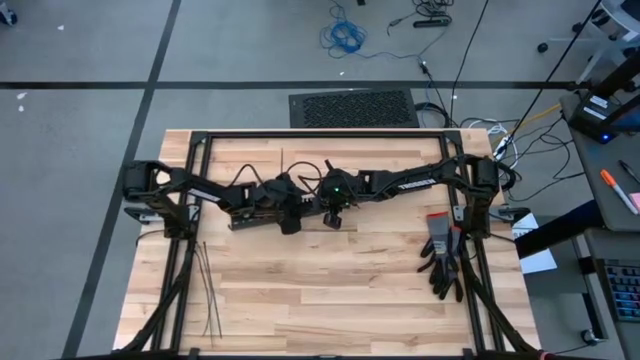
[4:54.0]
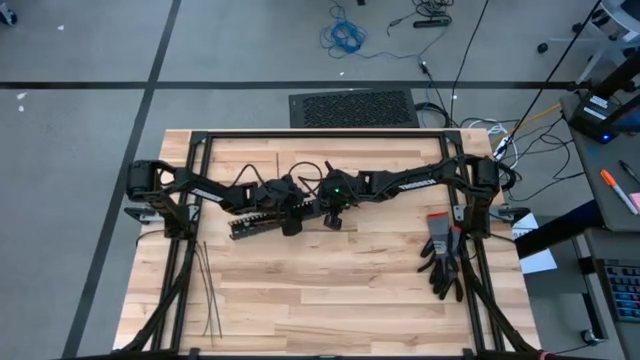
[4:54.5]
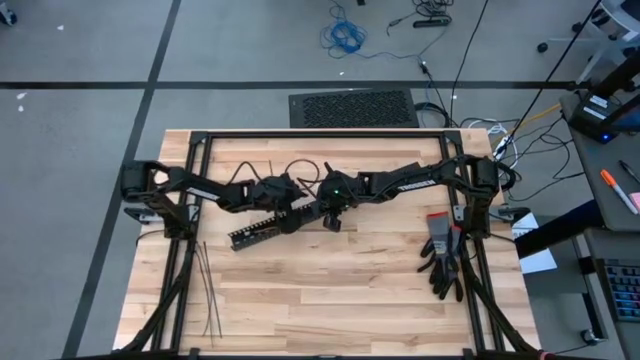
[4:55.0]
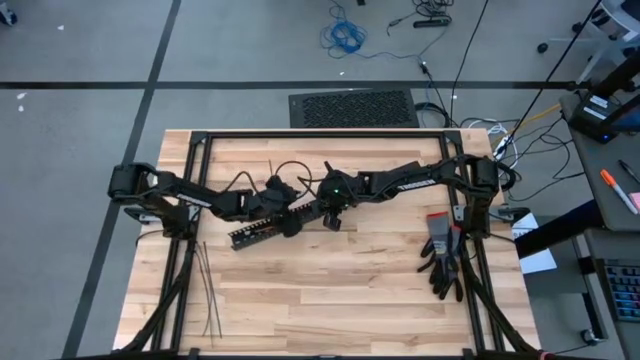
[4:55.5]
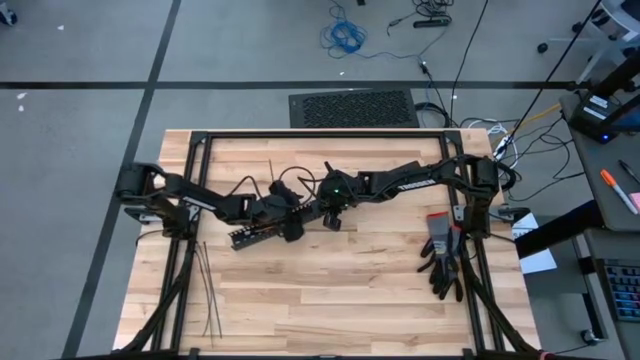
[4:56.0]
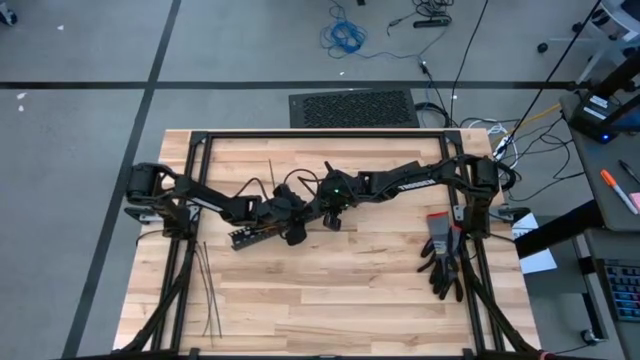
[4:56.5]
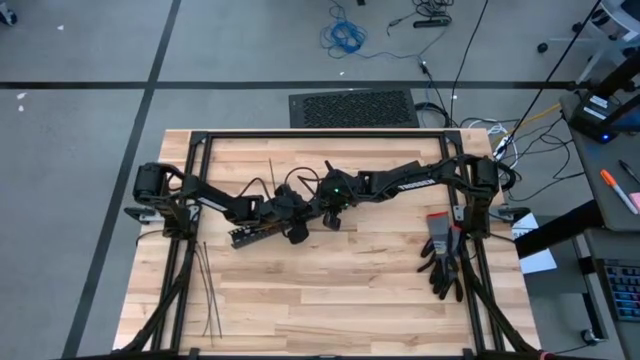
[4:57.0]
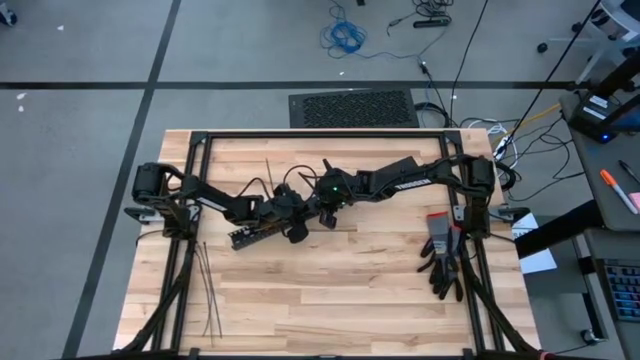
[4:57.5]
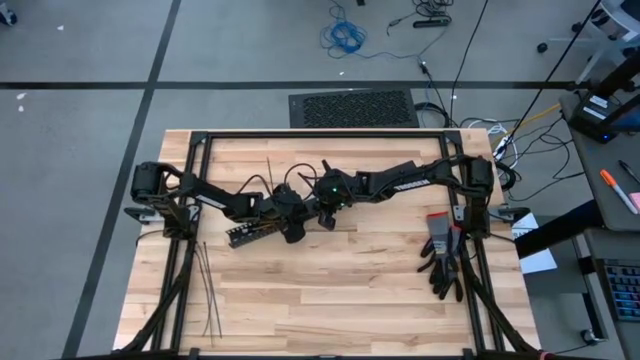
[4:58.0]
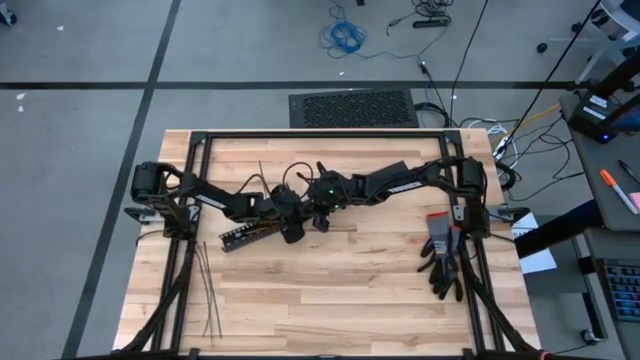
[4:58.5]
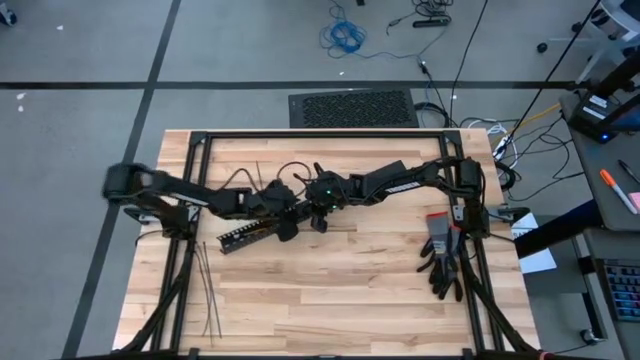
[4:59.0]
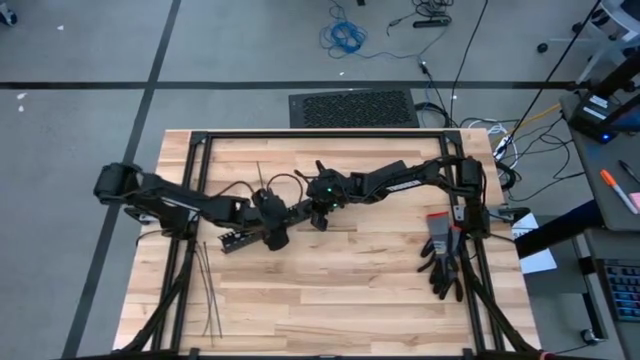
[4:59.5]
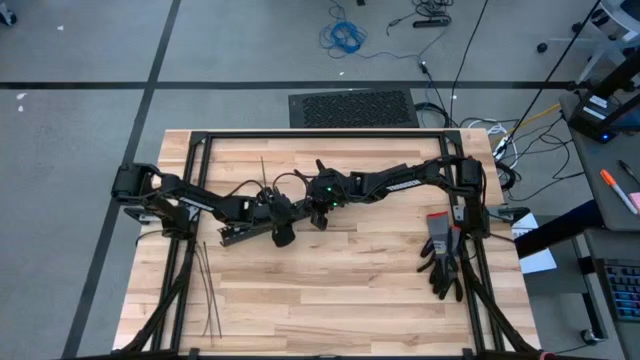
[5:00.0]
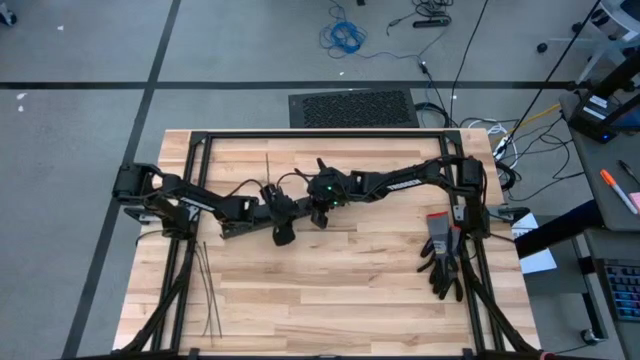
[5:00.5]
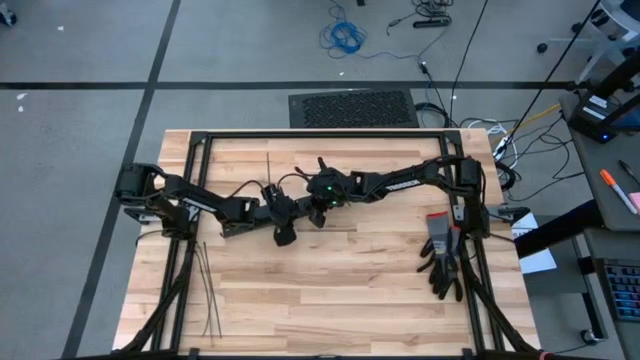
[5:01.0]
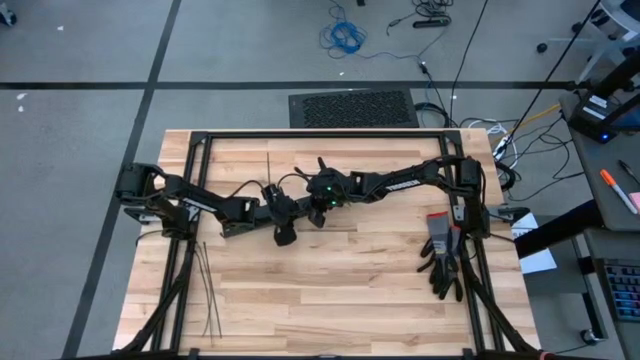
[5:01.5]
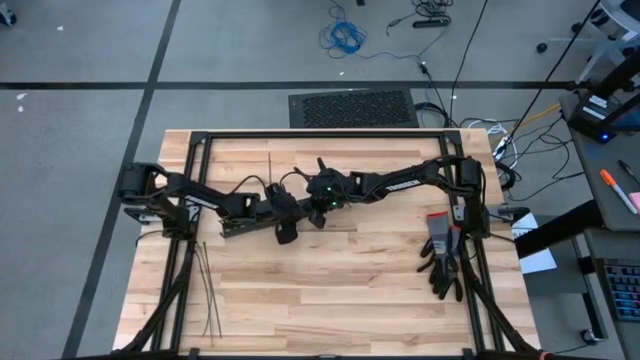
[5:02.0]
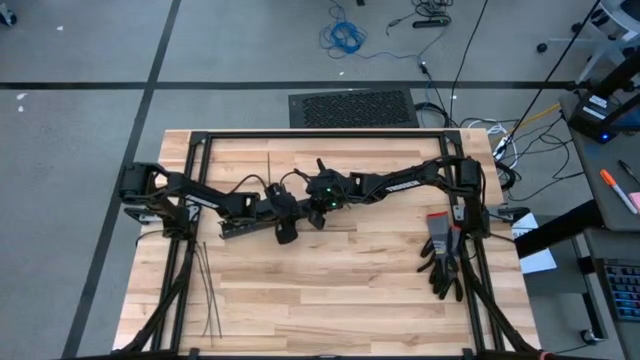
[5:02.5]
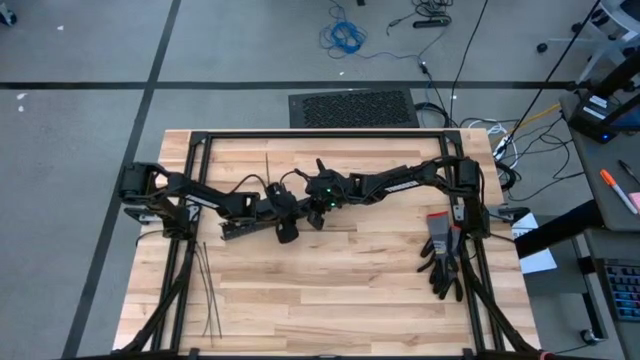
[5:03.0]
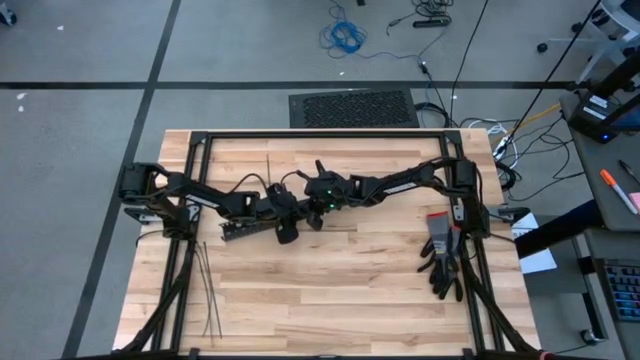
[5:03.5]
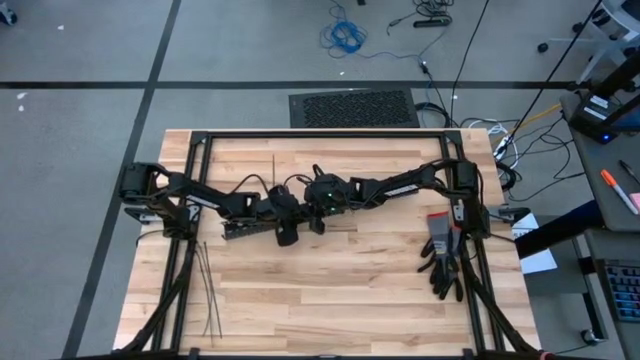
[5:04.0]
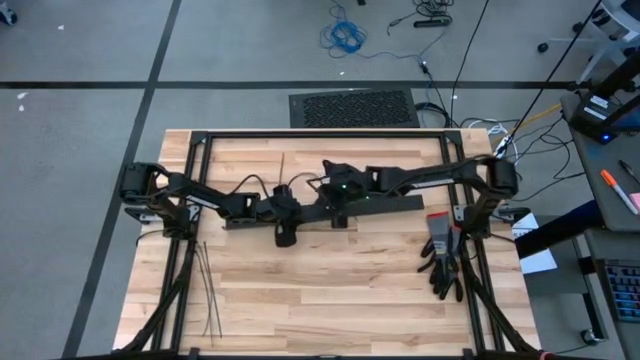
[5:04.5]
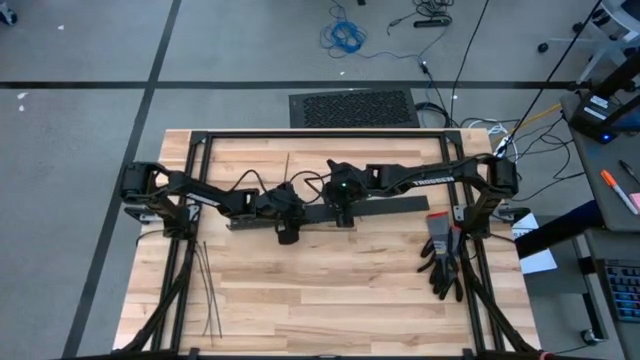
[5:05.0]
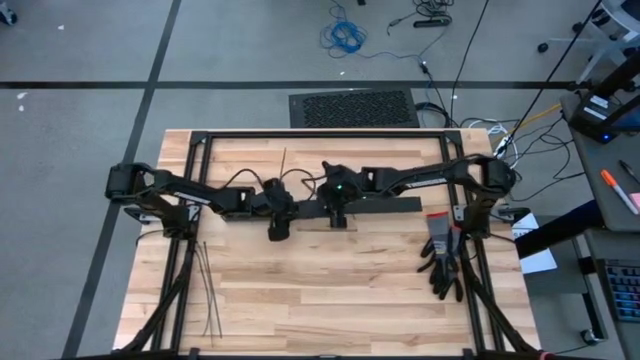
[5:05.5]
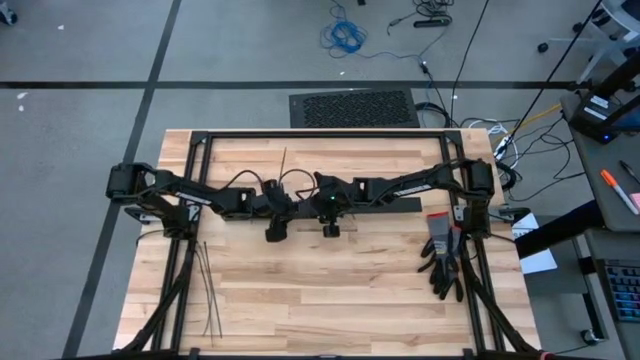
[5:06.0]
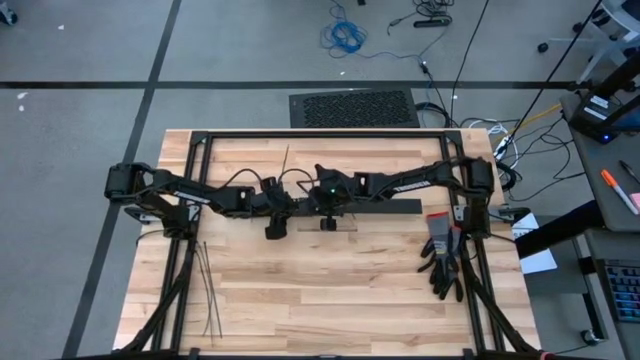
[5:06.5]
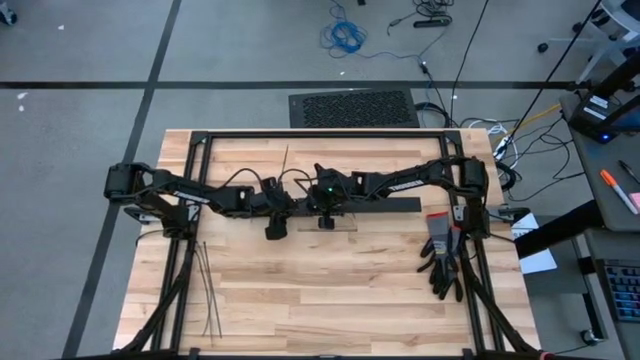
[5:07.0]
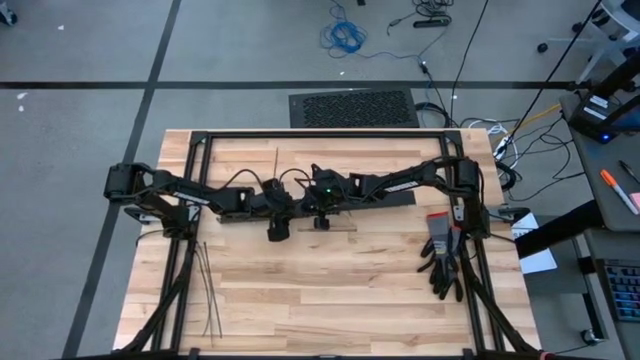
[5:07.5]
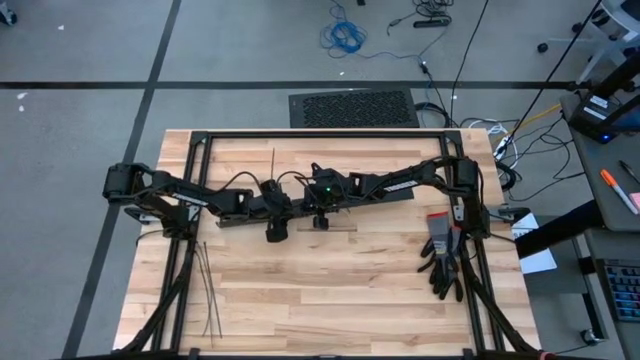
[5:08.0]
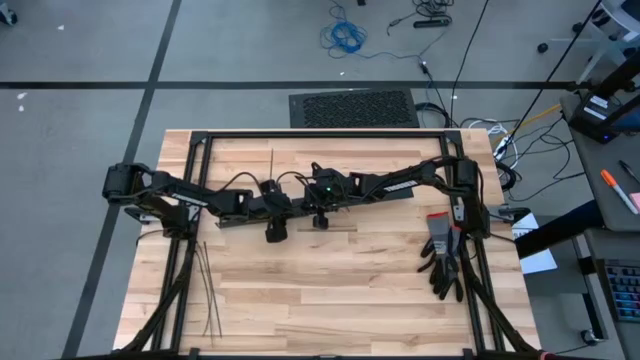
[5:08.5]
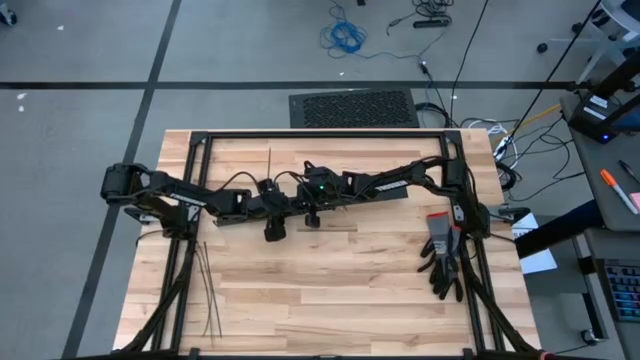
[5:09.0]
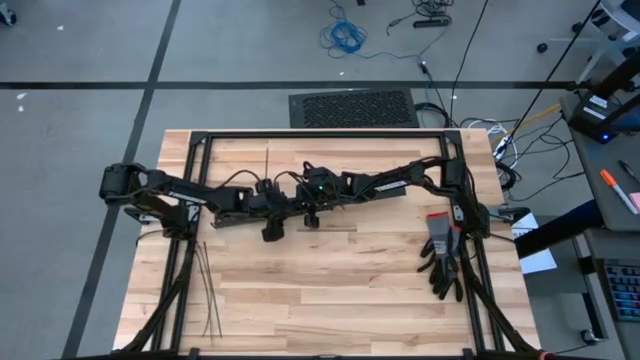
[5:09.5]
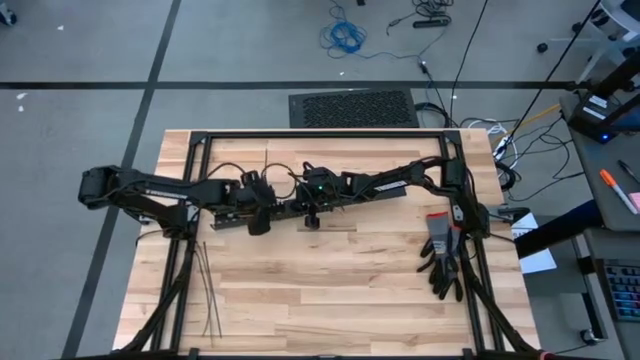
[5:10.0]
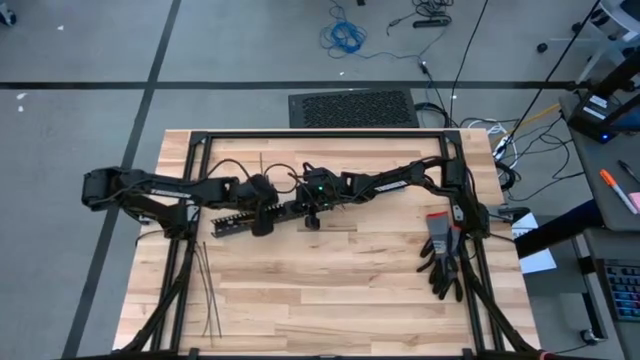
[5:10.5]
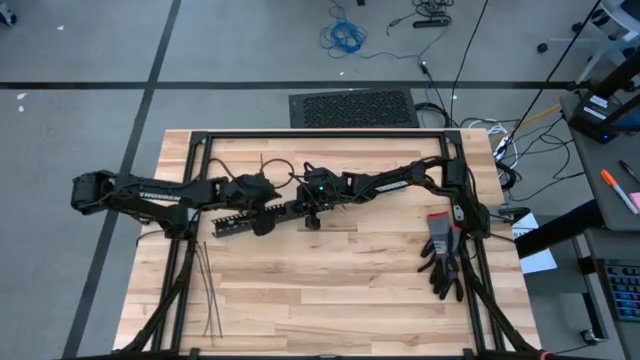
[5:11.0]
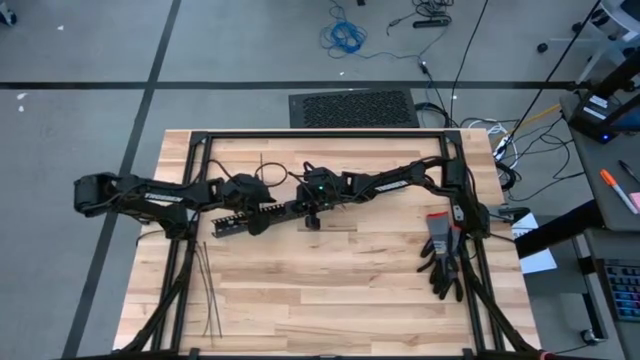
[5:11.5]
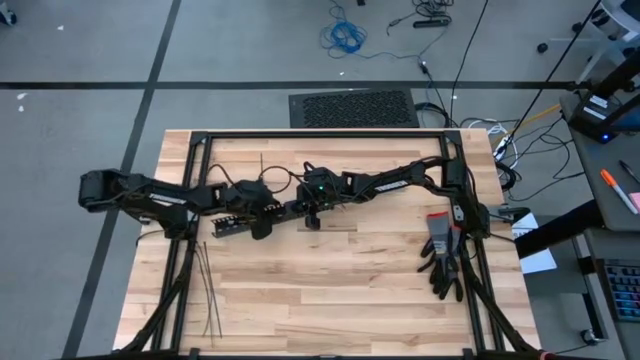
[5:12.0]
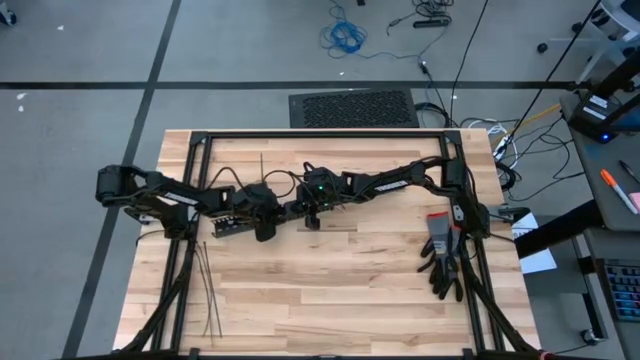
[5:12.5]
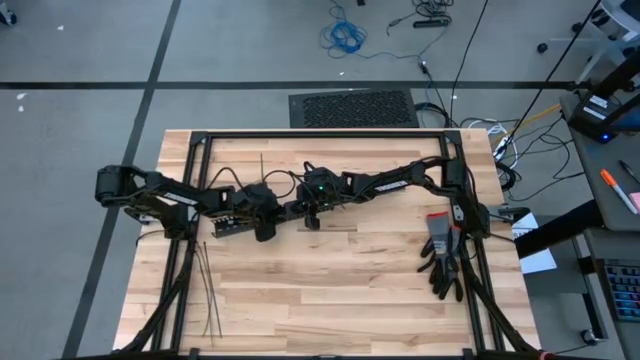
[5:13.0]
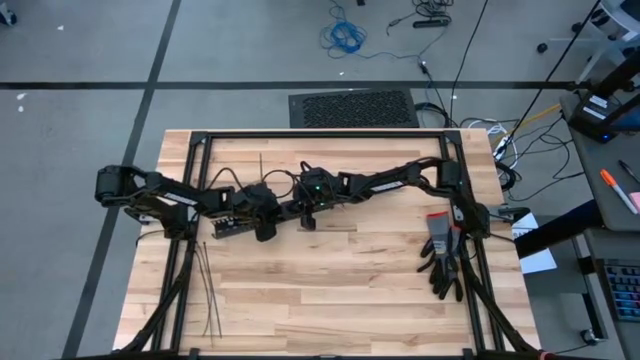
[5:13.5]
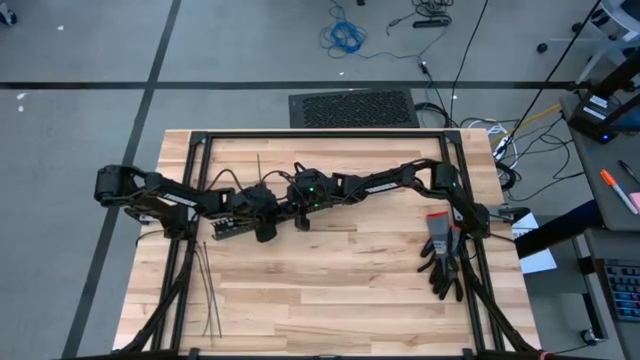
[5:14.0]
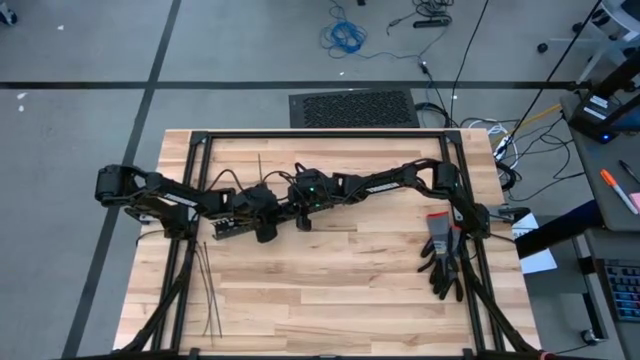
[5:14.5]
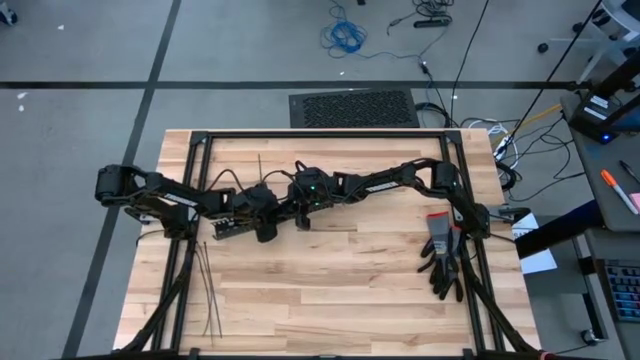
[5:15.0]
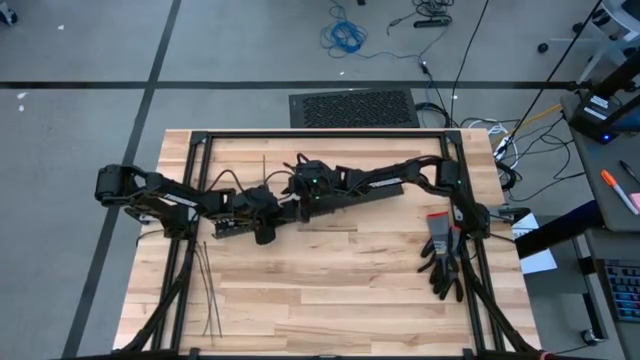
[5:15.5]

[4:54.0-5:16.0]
Task: Ziptie cables
Close the black cable duct
